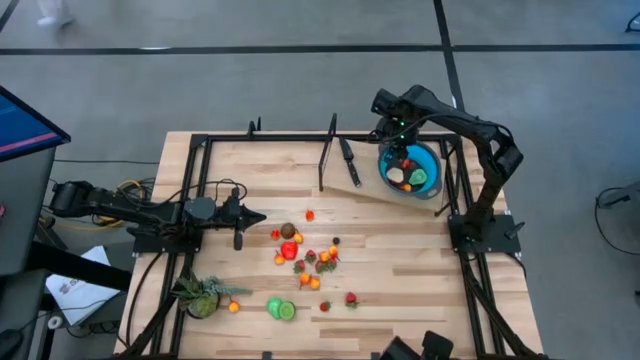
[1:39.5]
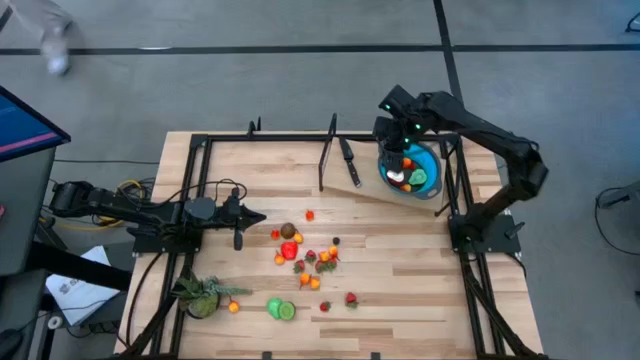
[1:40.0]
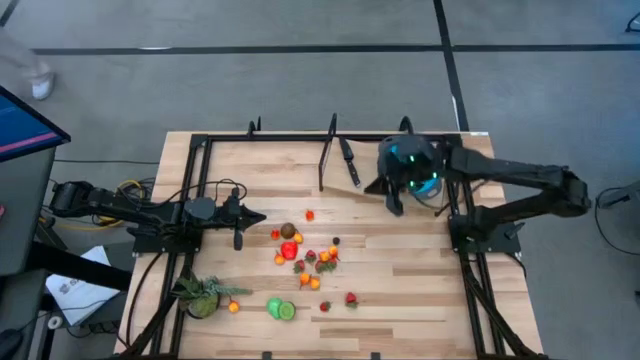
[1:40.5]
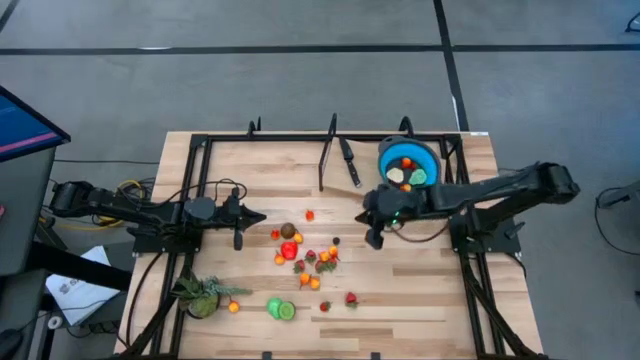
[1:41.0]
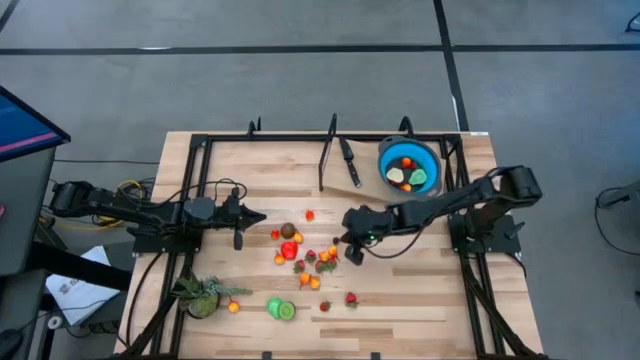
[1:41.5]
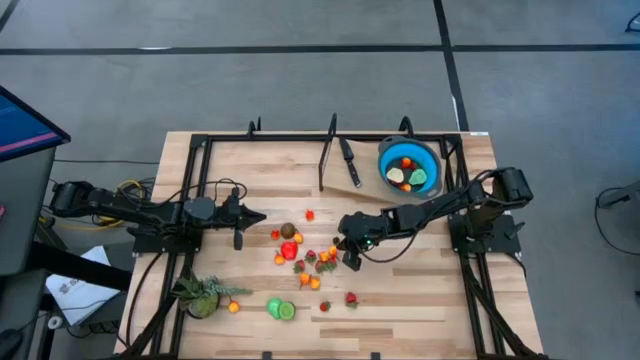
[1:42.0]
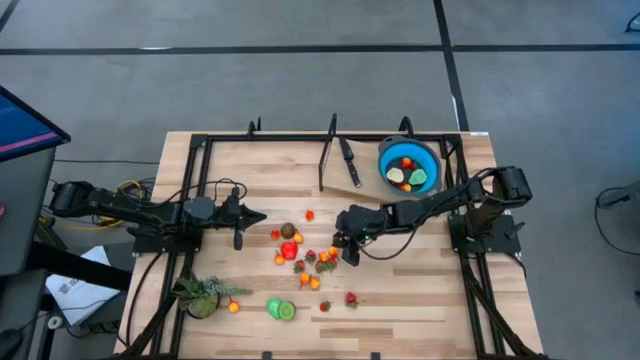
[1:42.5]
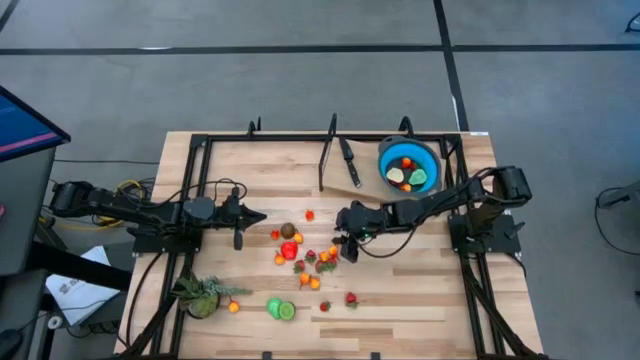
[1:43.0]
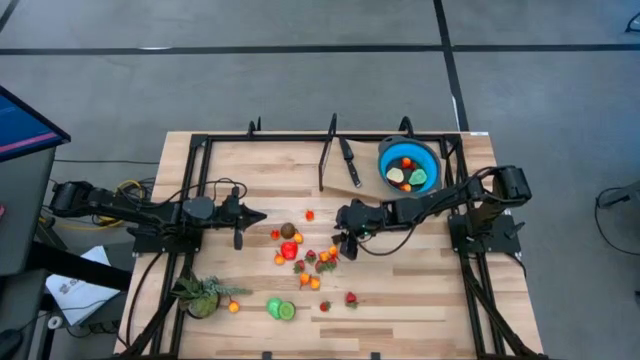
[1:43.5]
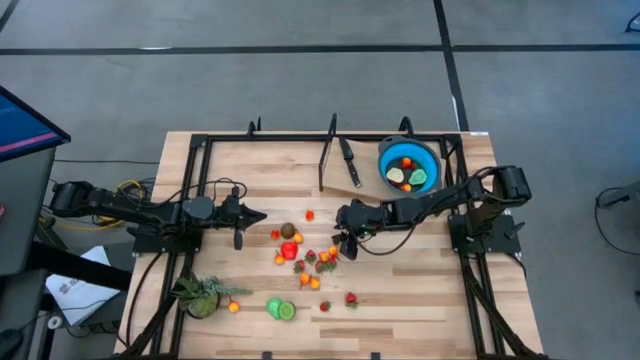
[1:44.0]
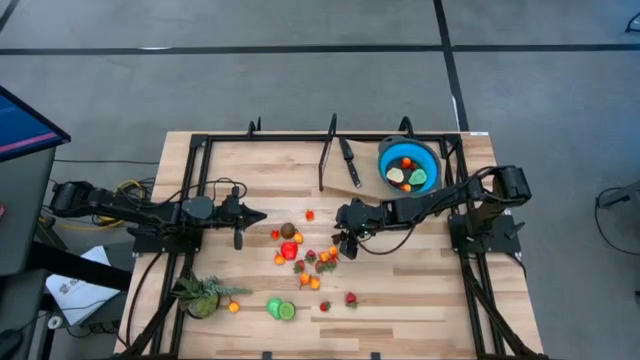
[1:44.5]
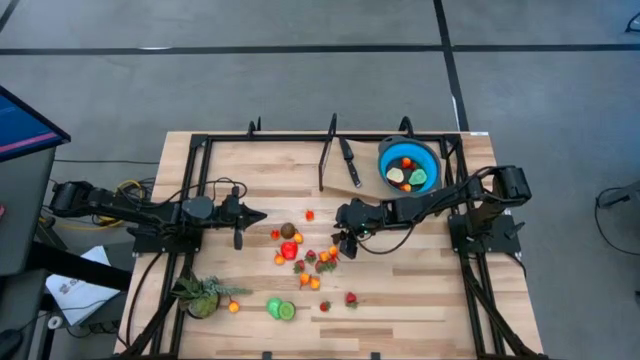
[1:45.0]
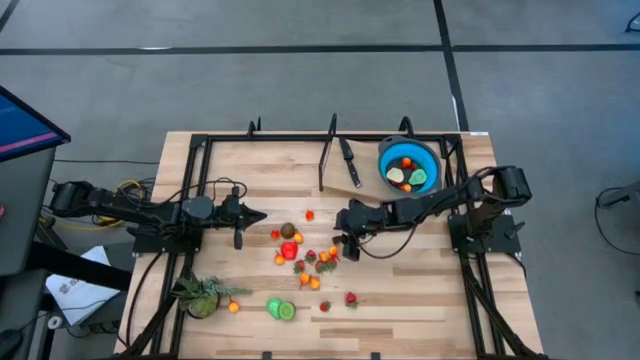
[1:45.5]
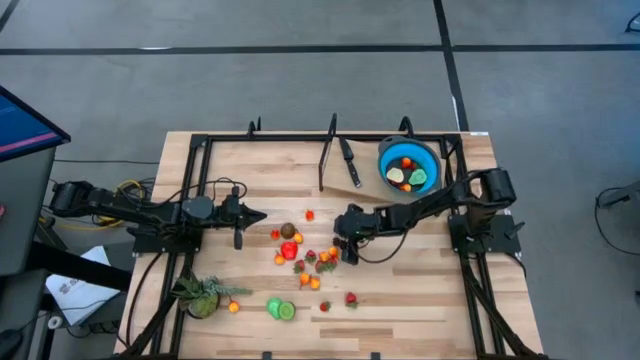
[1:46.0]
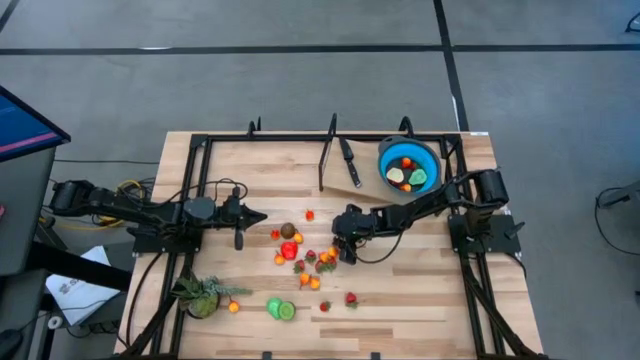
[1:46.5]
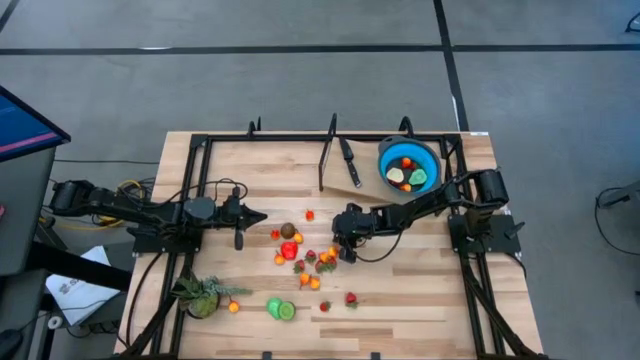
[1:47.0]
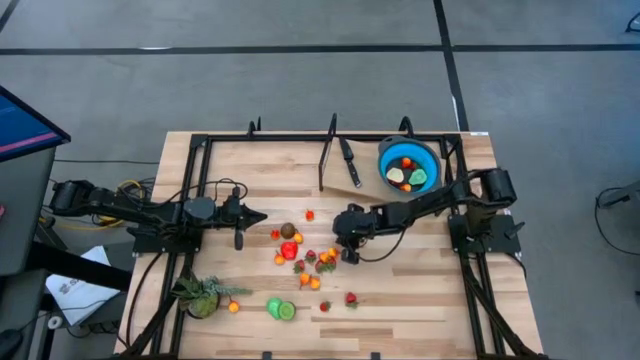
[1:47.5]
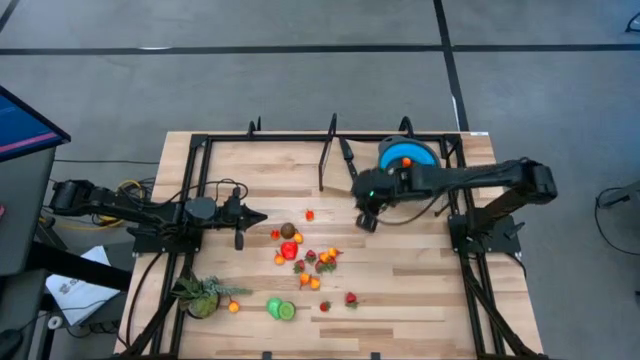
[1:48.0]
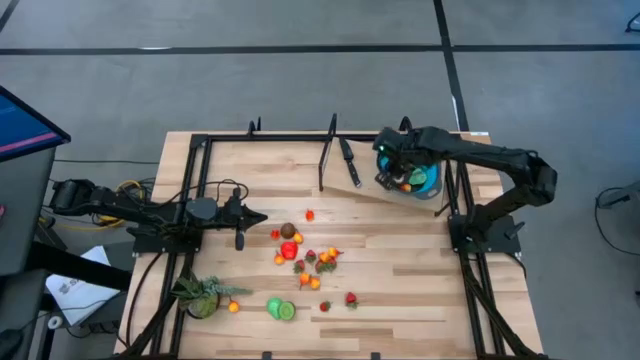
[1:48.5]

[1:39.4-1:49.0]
Task: Pick & Place Fruit
Put the blackberry into the blue colander

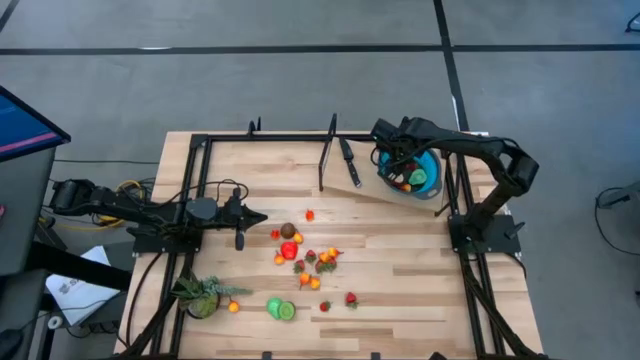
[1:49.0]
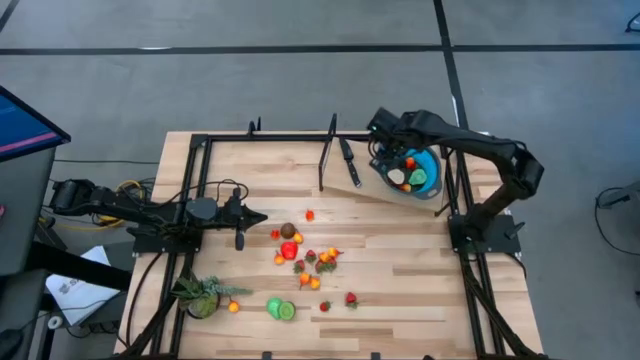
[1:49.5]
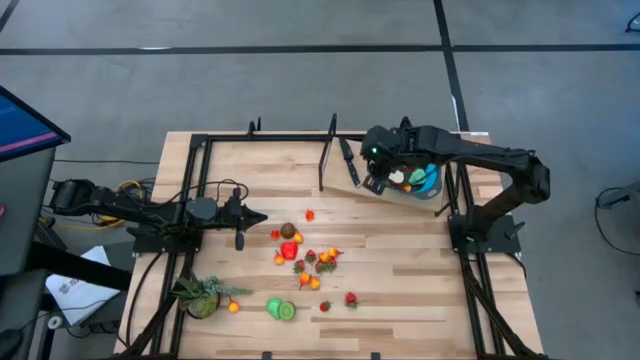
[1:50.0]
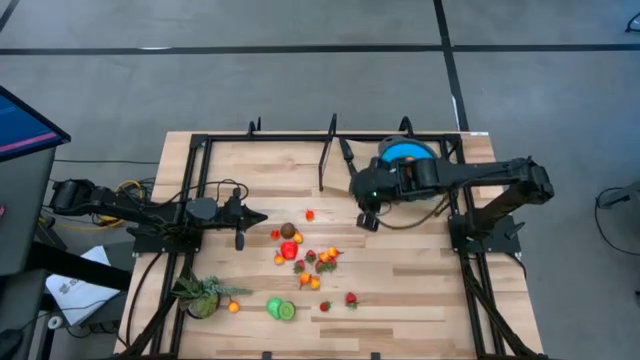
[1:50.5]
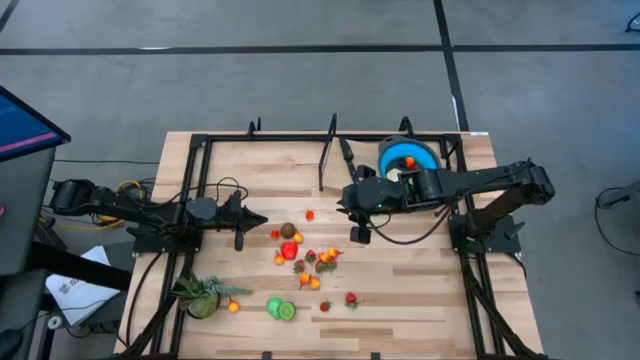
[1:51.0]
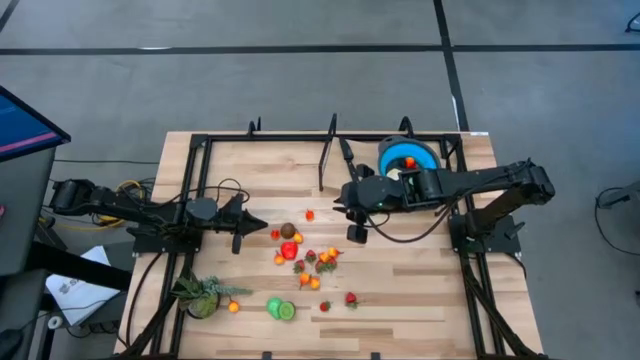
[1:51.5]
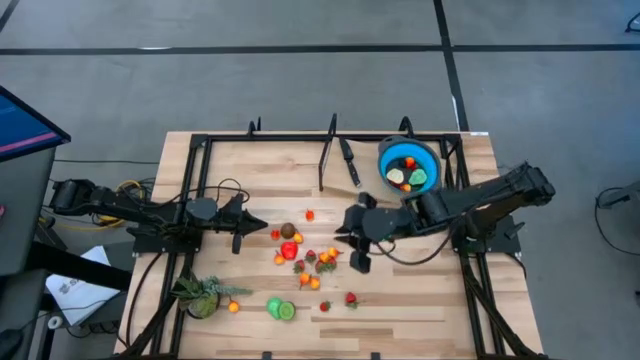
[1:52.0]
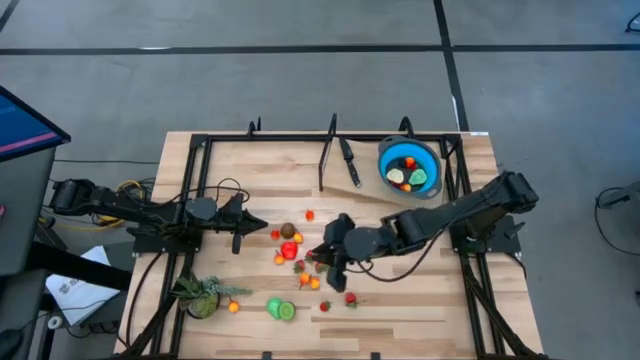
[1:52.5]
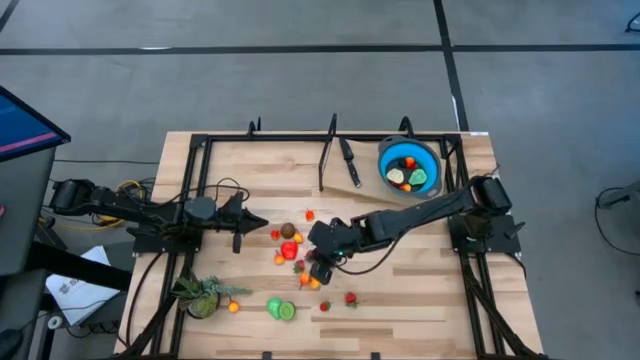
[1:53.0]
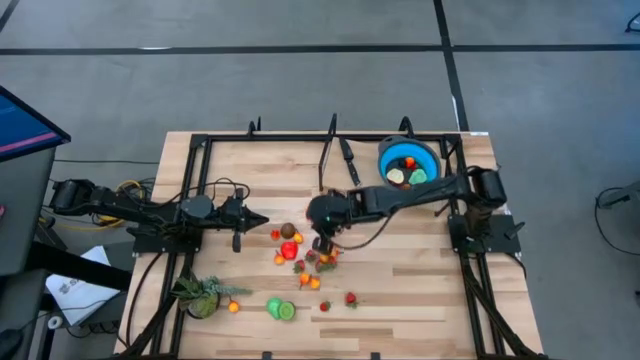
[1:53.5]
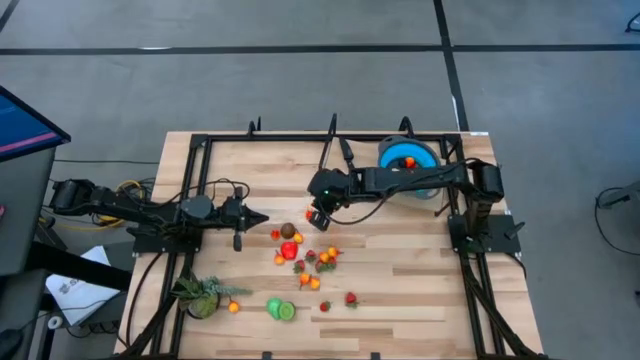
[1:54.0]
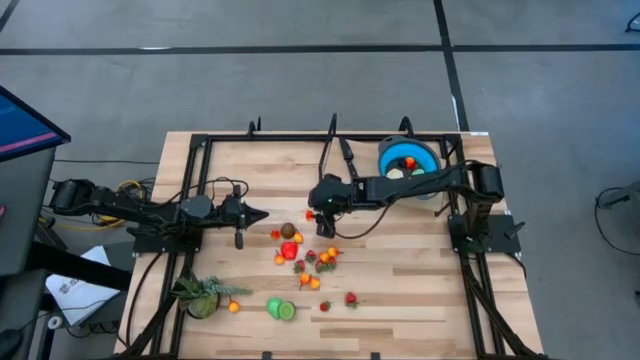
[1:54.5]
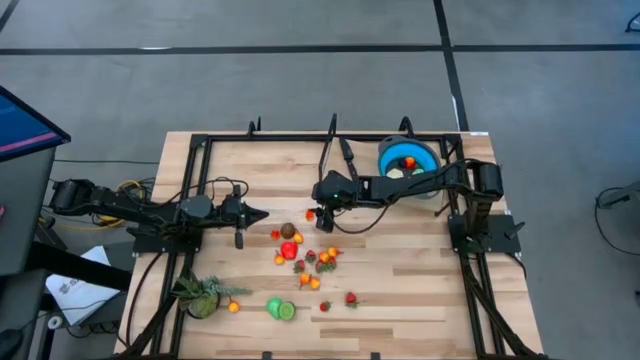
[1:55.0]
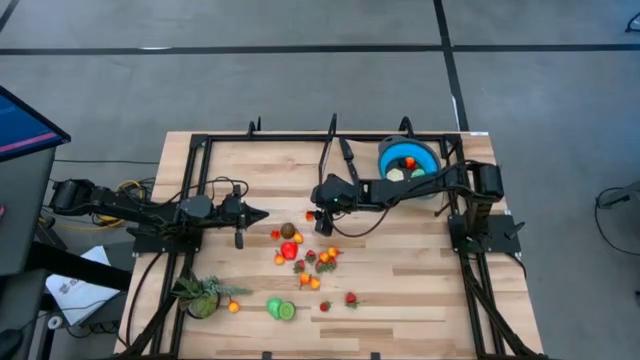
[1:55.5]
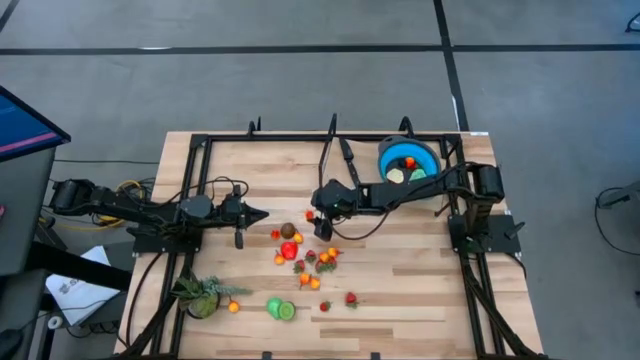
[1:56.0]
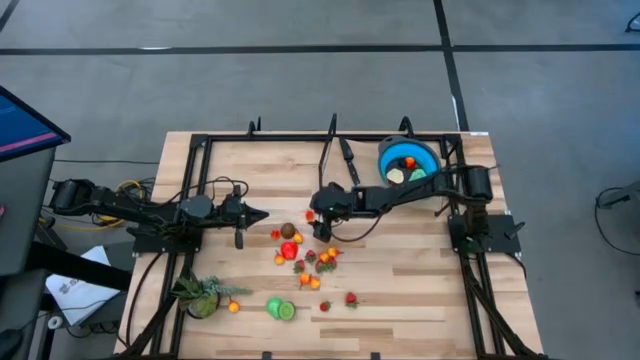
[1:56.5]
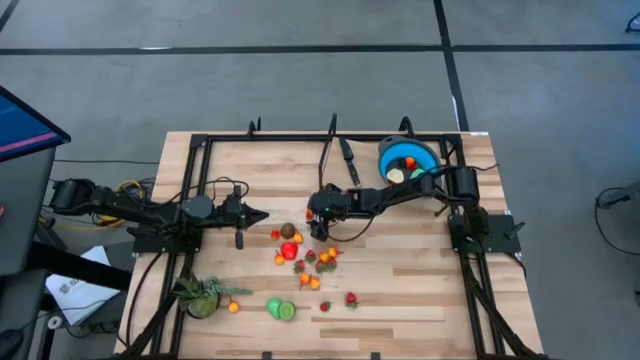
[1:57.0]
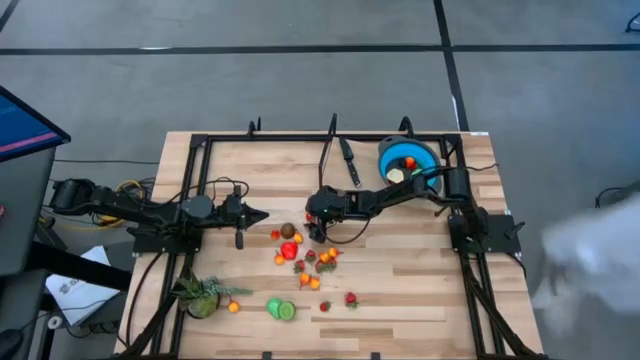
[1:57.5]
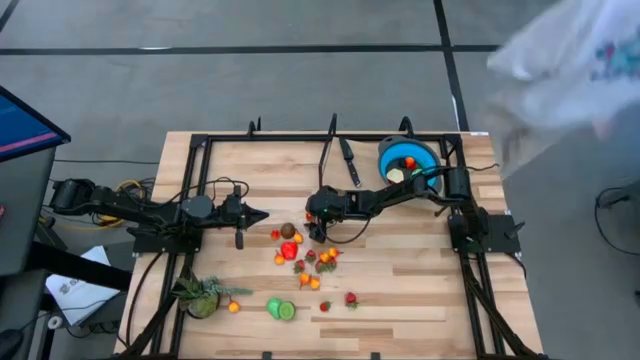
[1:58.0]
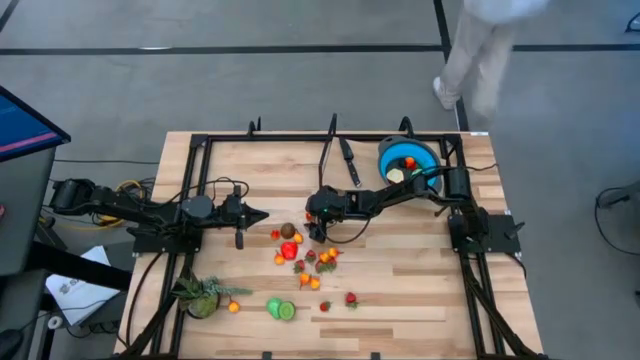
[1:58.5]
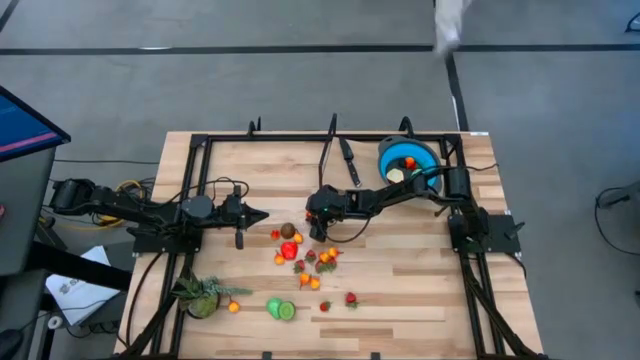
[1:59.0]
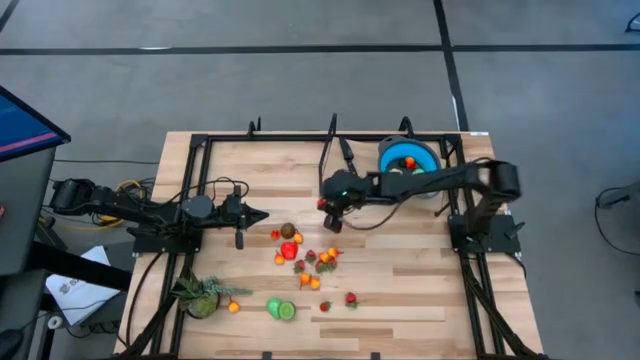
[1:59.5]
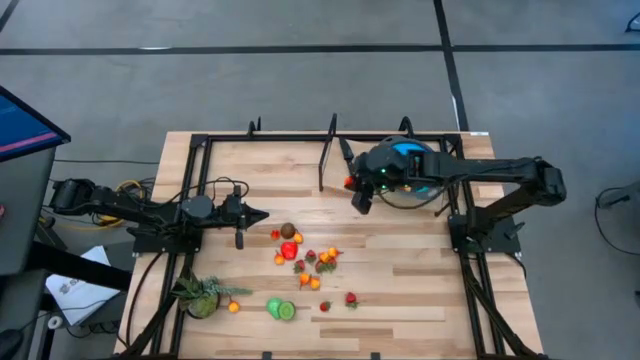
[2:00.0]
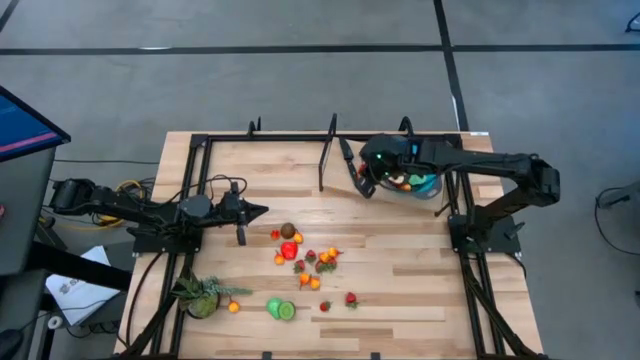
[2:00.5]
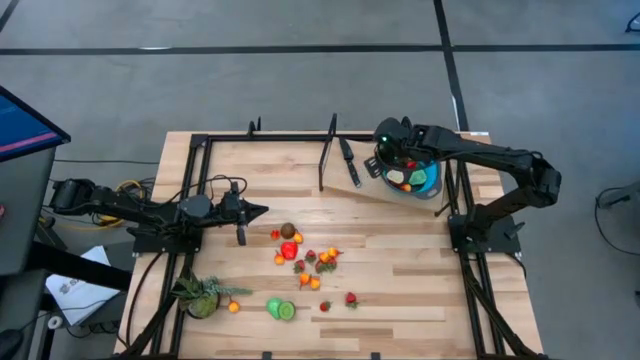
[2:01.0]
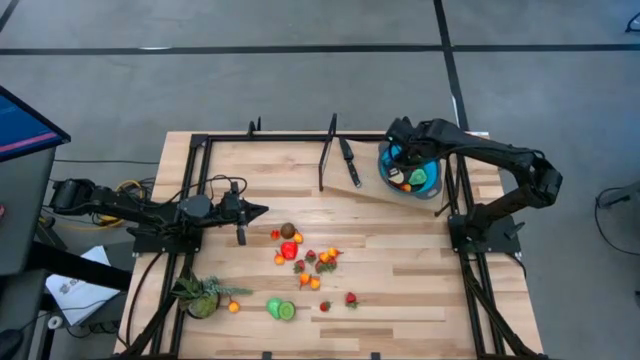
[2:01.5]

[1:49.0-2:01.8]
Put the orange pear into the blue colander
